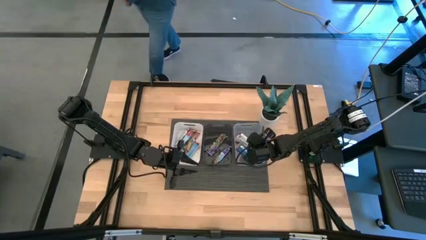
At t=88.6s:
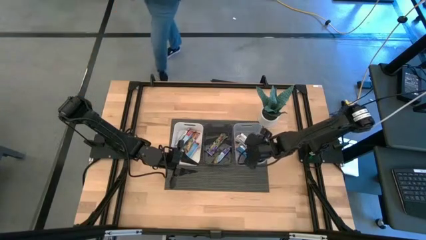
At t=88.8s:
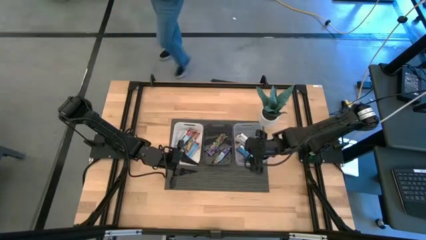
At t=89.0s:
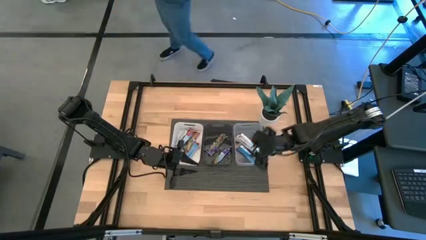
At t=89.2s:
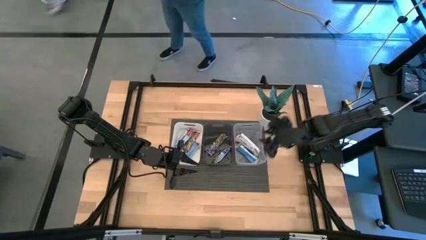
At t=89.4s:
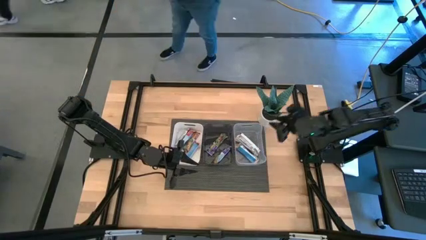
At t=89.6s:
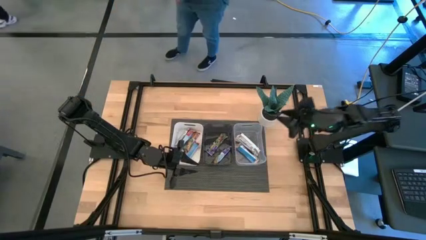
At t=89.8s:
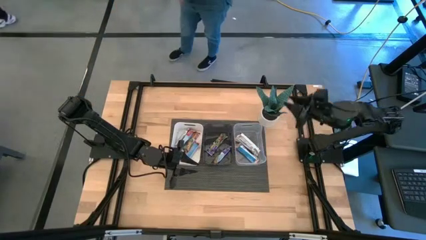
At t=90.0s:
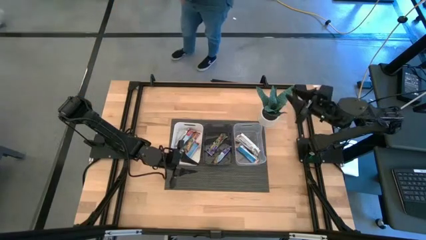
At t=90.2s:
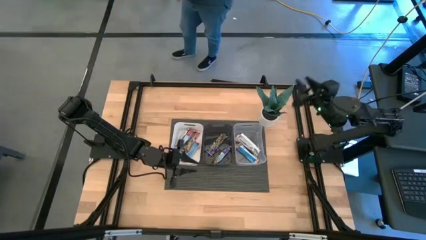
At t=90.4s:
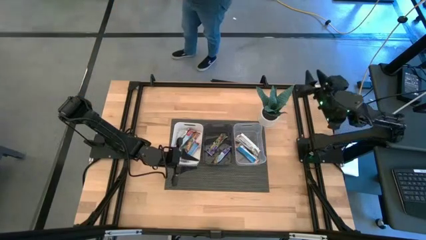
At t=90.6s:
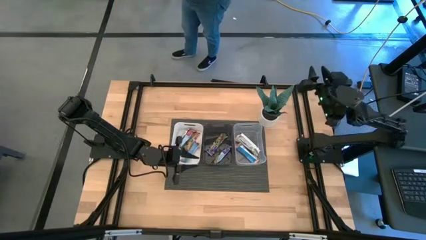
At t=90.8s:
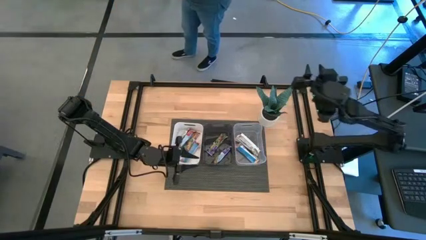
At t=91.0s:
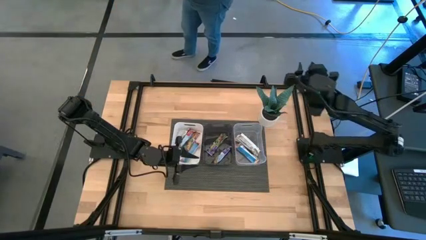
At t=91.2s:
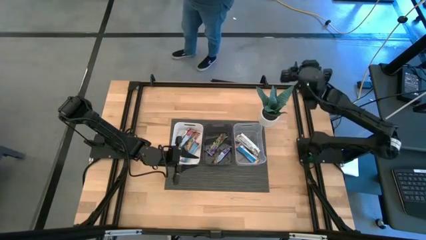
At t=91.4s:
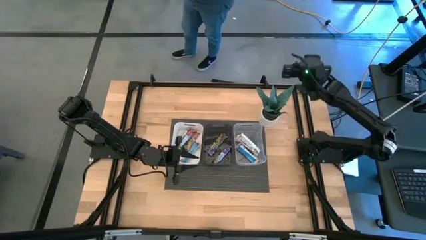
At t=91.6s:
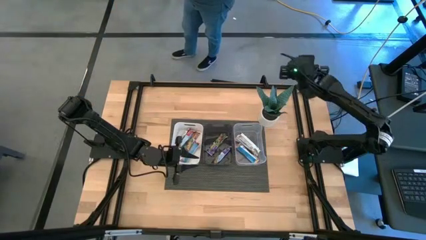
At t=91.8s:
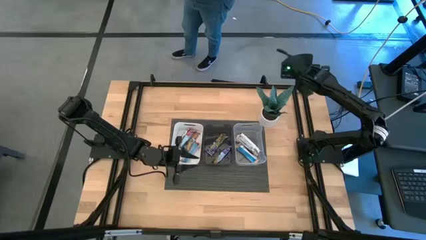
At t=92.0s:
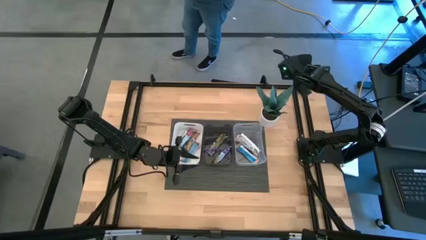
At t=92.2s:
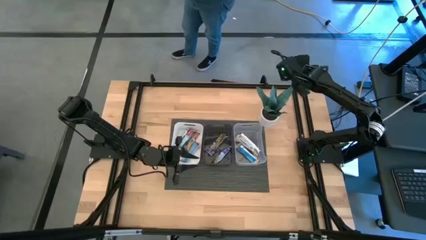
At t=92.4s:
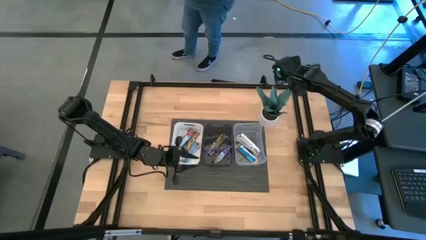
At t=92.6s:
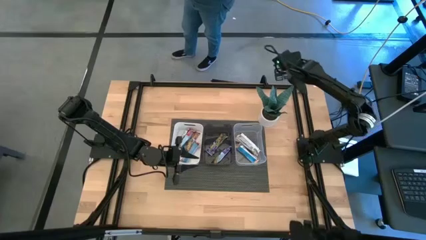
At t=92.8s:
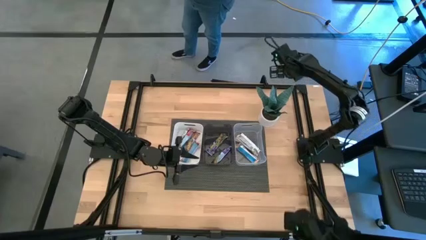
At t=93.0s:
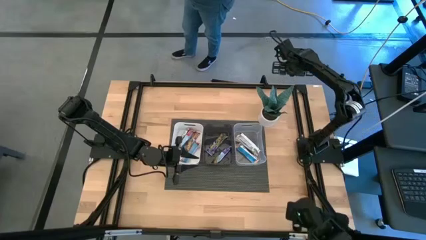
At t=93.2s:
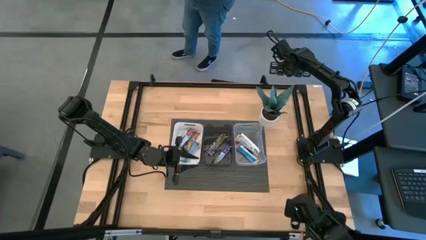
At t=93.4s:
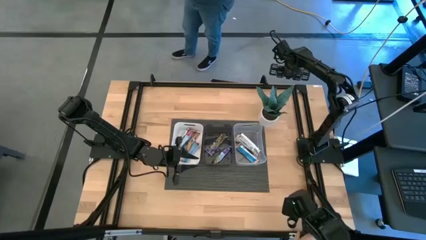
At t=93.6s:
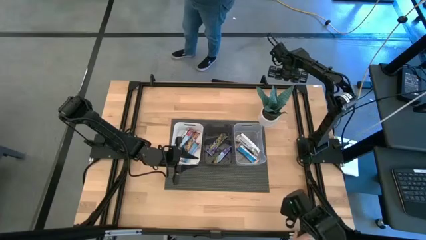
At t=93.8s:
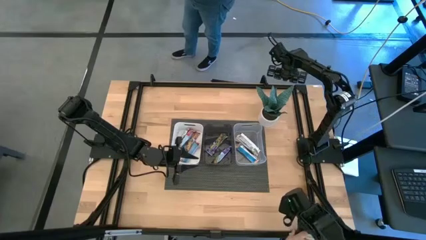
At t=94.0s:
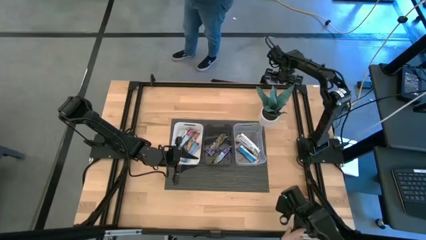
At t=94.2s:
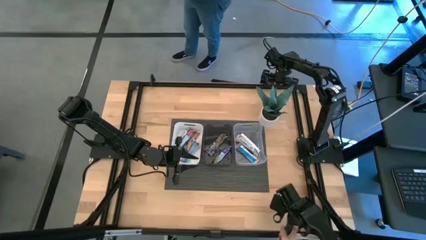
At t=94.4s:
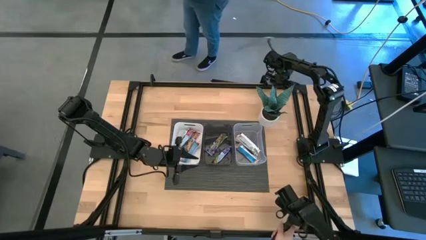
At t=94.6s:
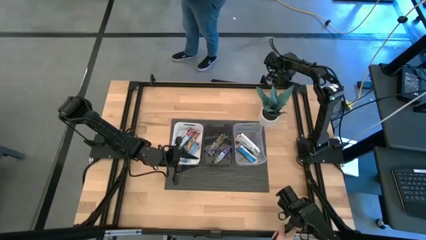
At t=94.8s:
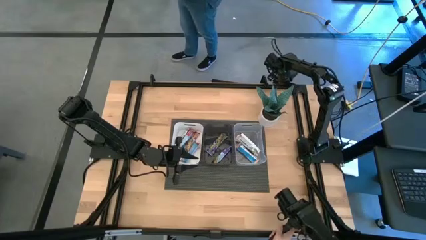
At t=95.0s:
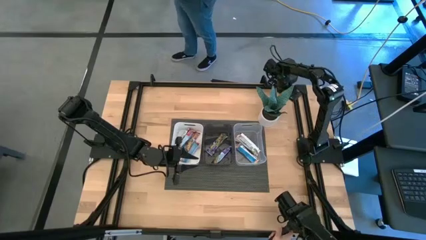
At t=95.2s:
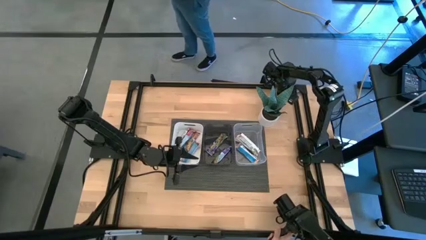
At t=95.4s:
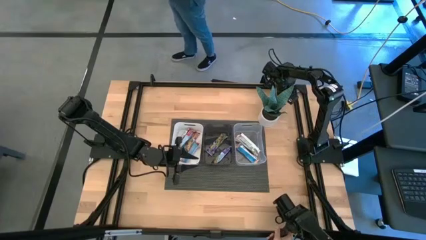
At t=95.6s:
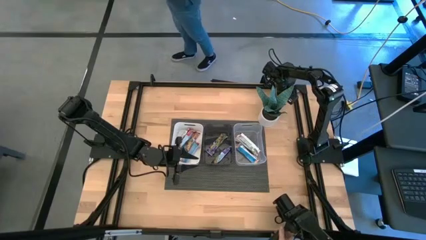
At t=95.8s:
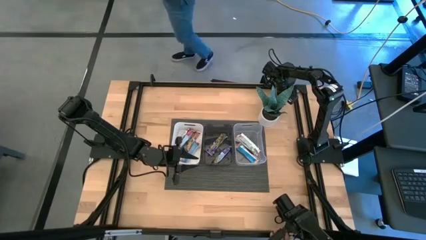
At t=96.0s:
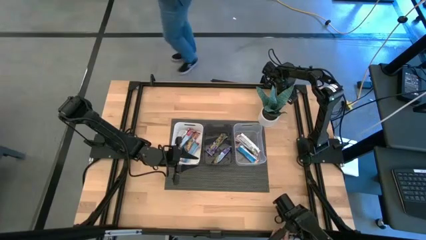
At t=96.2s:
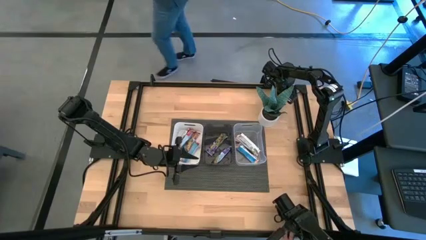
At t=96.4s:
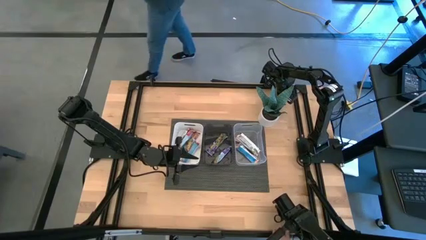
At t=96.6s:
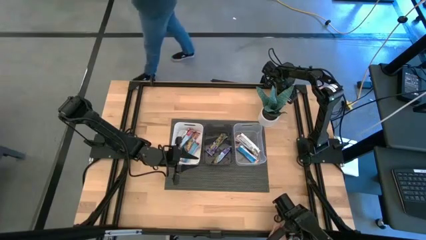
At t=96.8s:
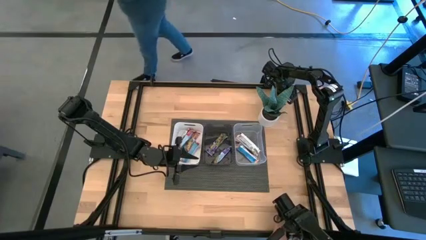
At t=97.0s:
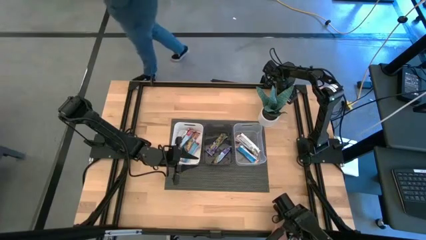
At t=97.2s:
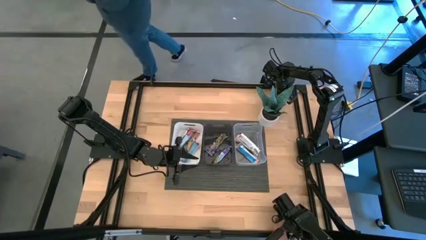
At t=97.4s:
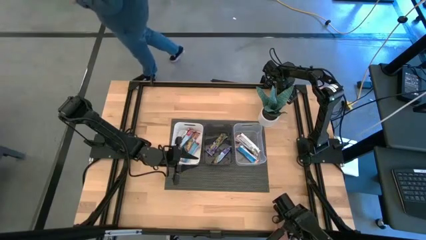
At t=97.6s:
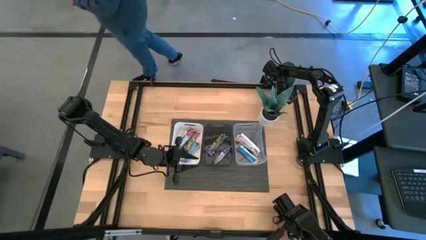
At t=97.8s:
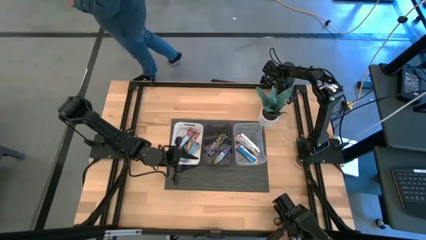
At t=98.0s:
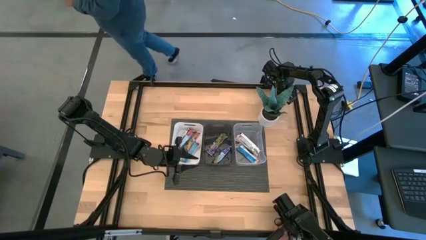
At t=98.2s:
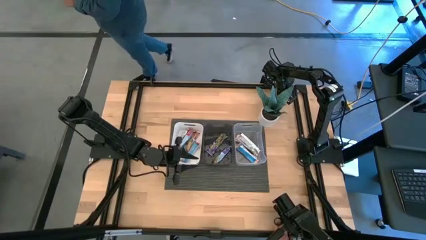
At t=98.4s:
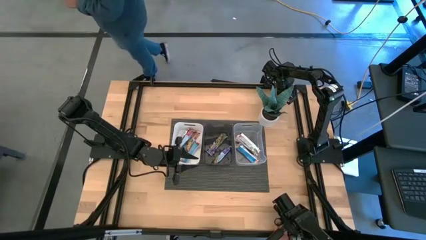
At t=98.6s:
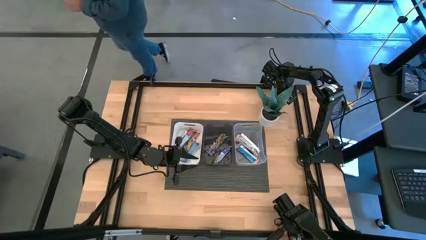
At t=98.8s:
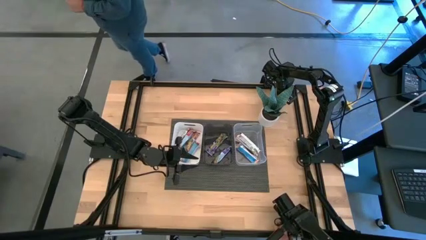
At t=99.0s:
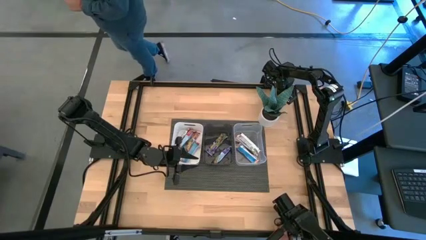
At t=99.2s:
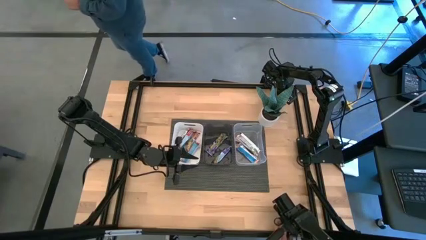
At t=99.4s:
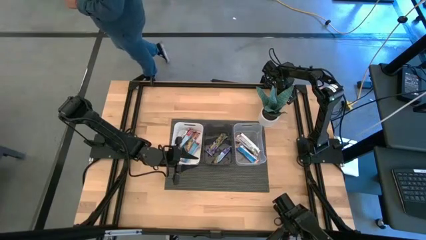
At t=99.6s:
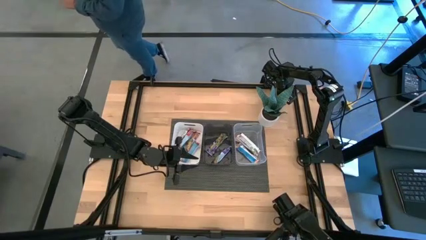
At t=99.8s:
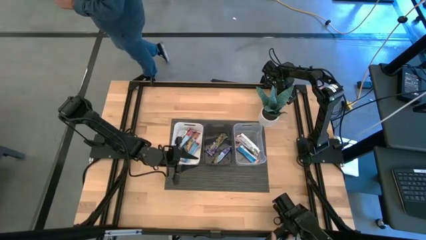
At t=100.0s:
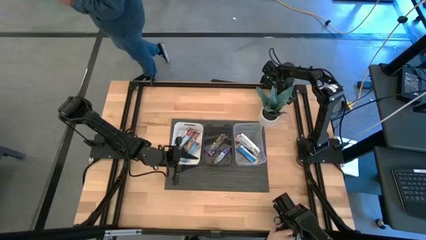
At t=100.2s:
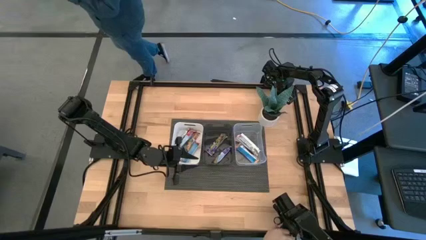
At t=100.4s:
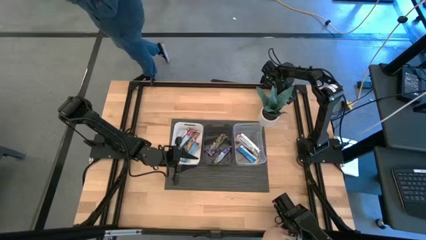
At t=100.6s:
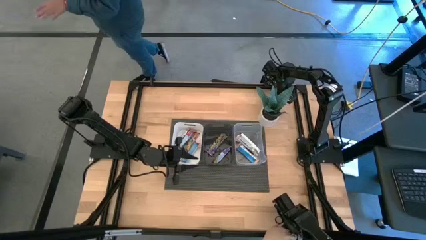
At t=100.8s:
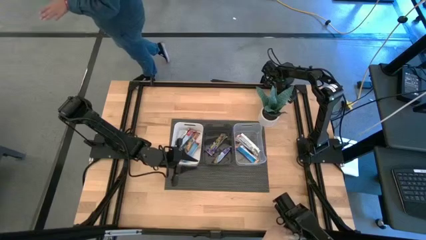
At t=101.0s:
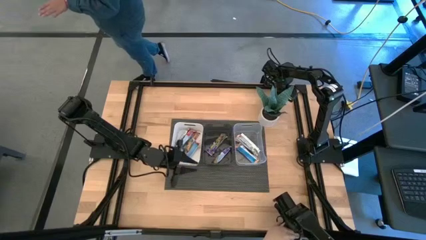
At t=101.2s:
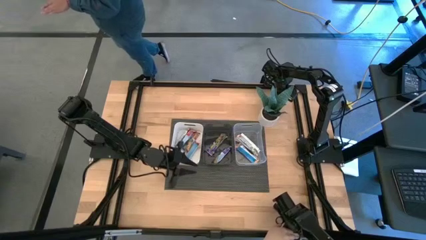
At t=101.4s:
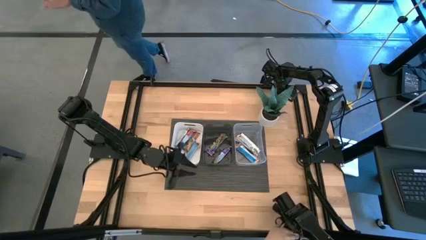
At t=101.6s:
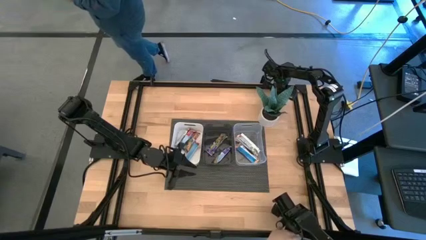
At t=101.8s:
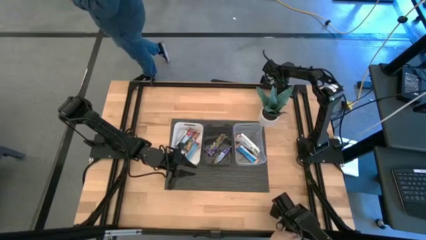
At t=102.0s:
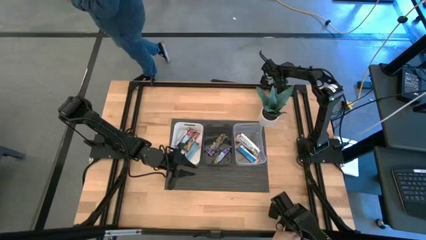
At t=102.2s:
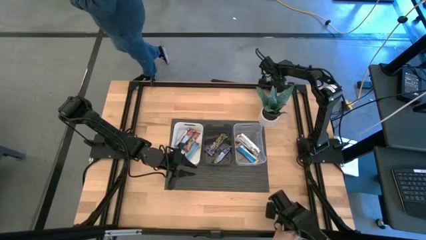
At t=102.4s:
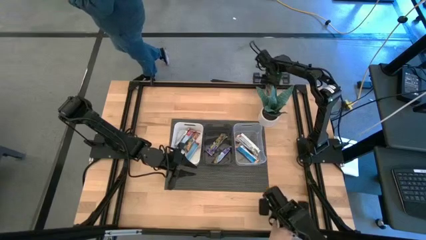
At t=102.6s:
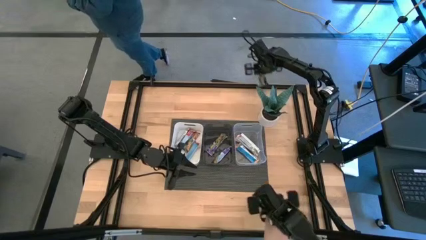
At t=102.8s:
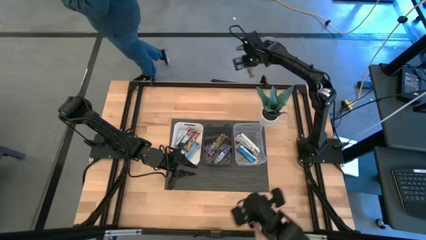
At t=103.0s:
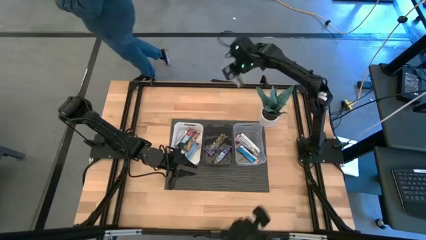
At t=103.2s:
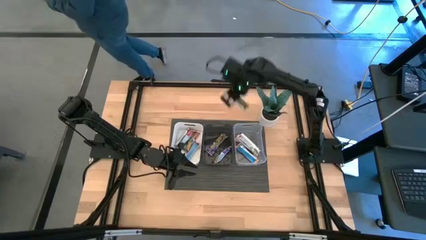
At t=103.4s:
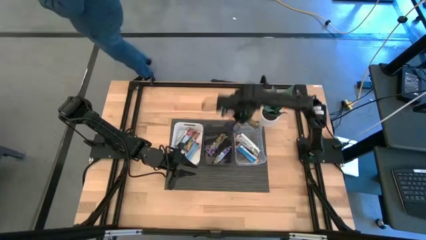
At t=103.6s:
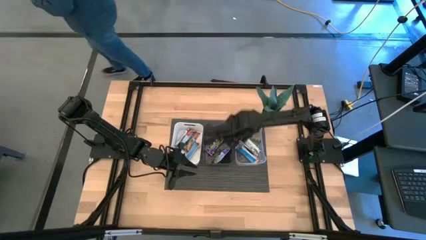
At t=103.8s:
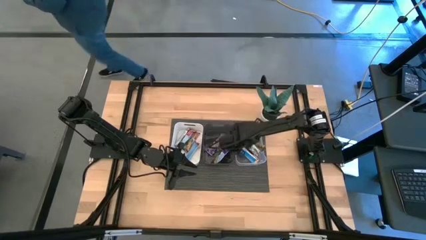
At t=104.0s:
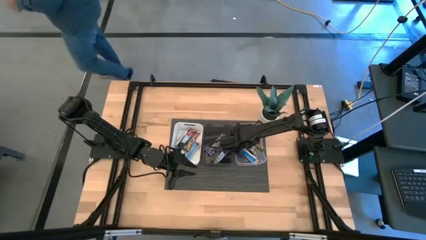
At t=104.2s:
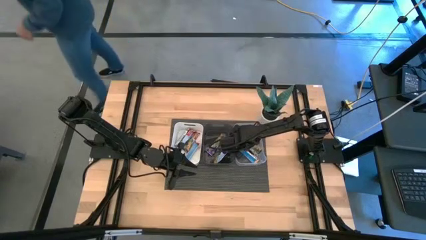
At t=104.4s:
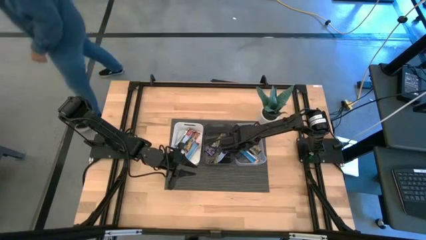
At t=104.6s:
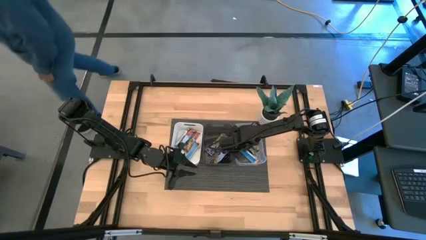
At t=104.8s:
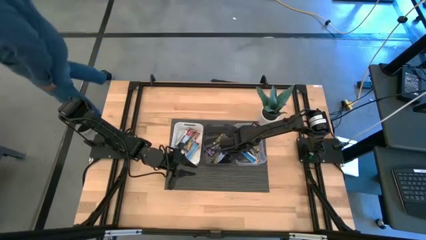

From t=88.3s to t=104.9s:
Task: Pick and place Granola Bars by type
Put the yellow granola bar into the transparent bin
